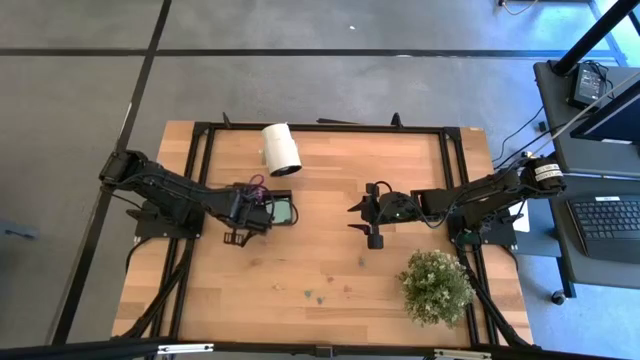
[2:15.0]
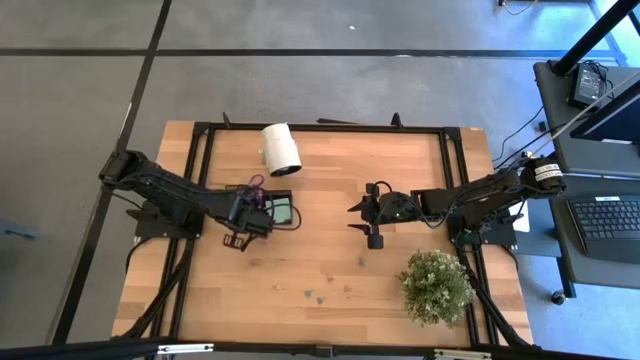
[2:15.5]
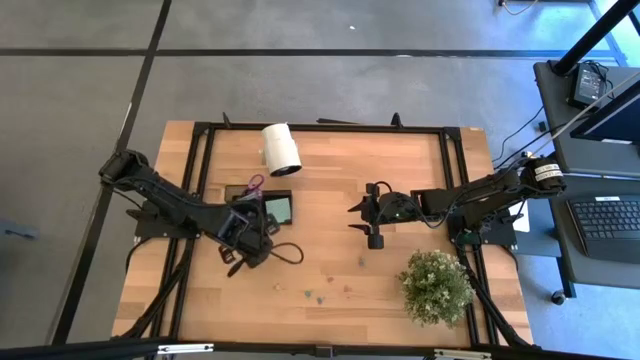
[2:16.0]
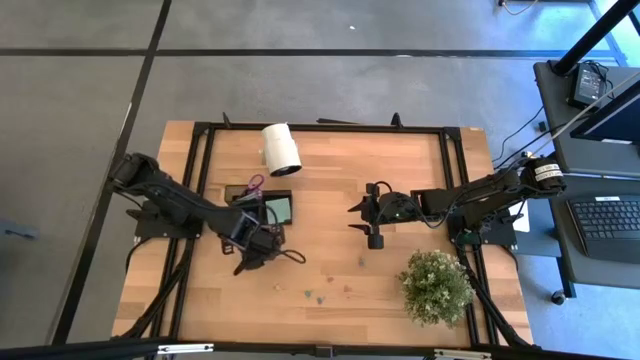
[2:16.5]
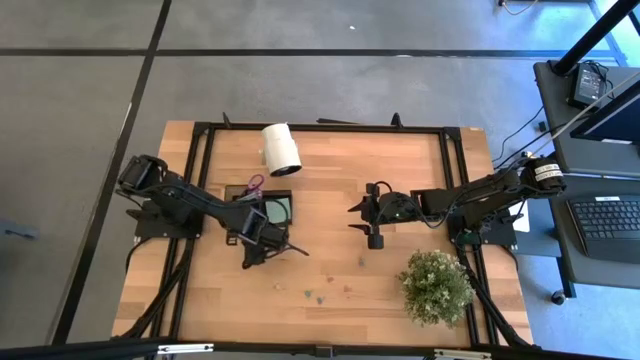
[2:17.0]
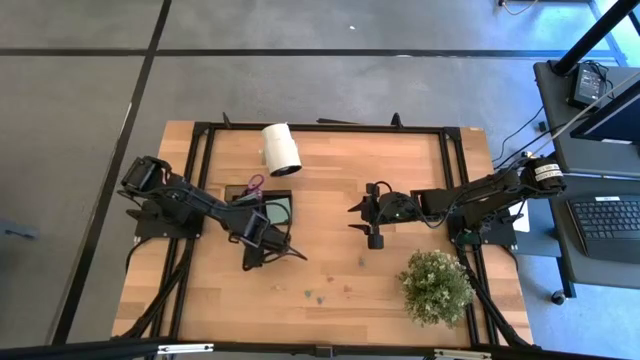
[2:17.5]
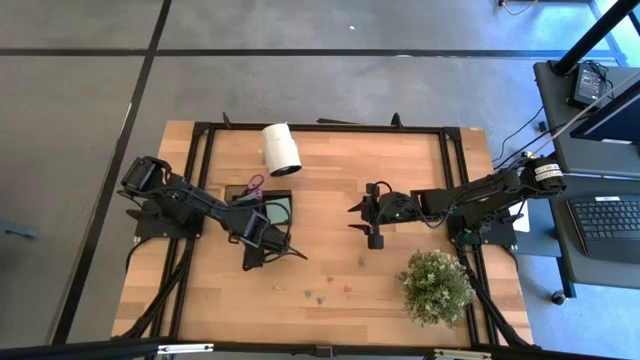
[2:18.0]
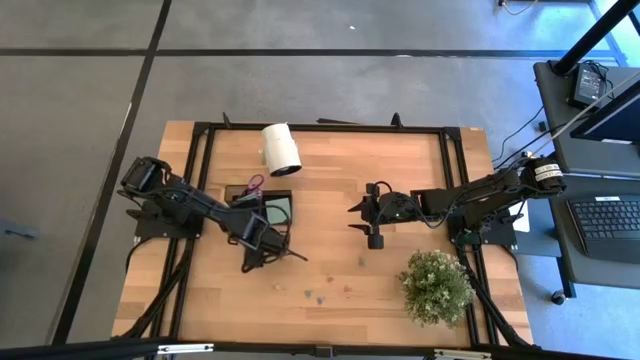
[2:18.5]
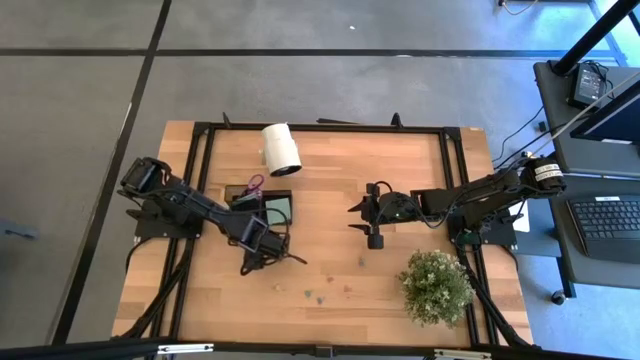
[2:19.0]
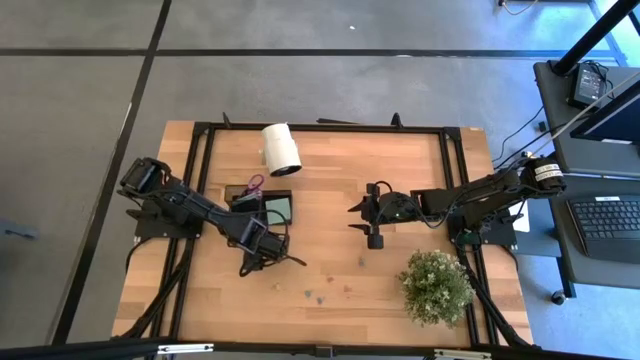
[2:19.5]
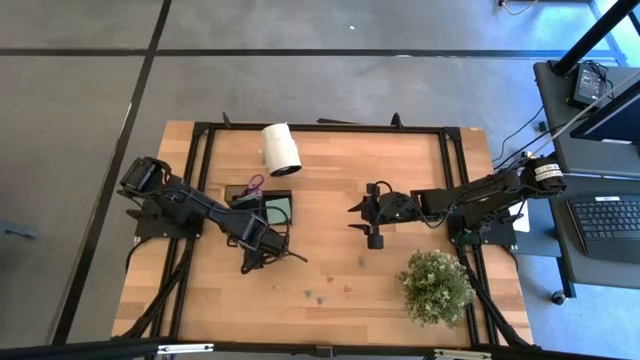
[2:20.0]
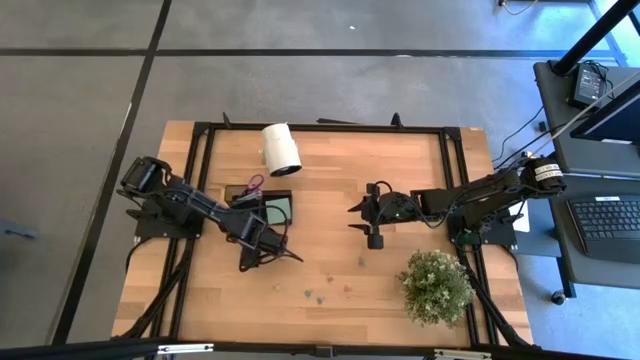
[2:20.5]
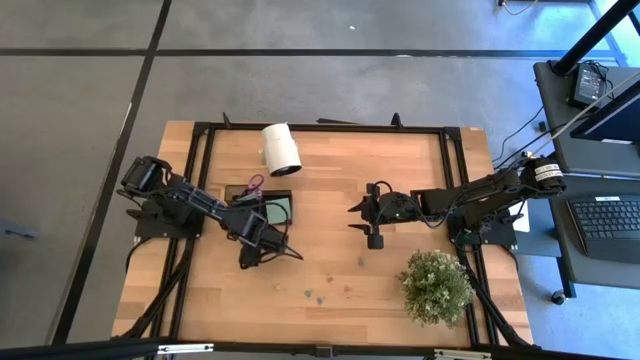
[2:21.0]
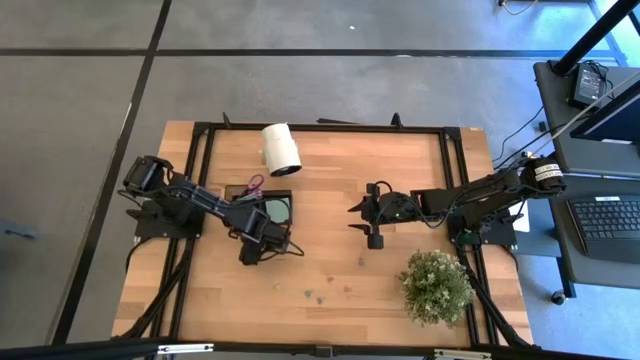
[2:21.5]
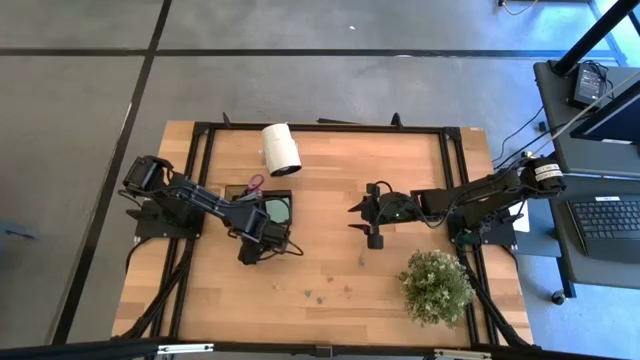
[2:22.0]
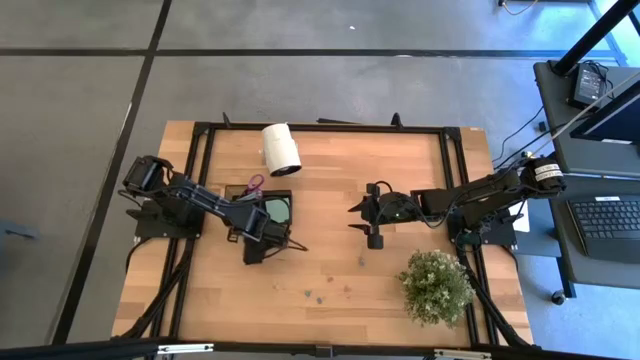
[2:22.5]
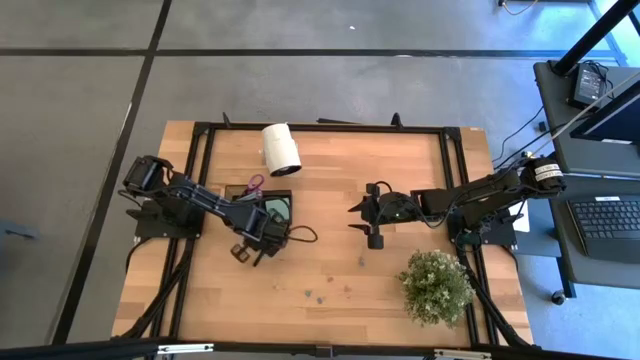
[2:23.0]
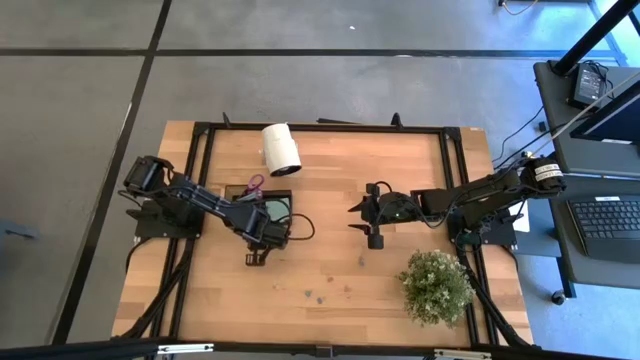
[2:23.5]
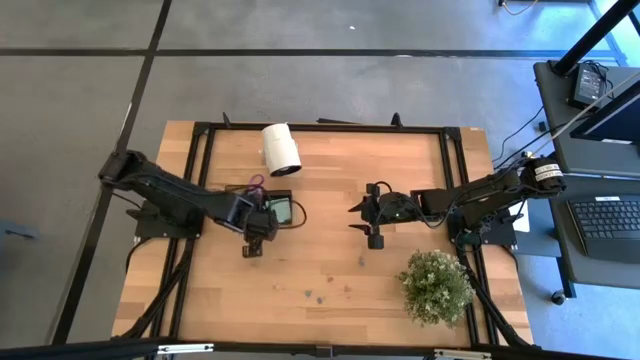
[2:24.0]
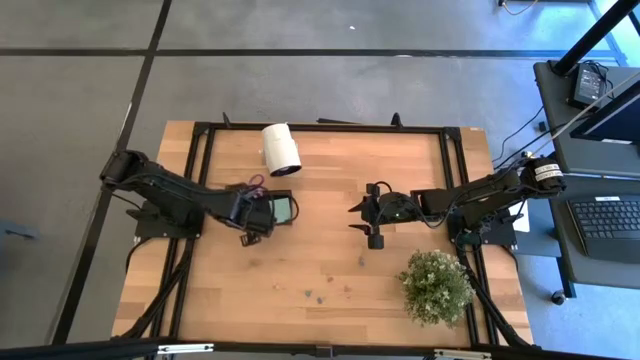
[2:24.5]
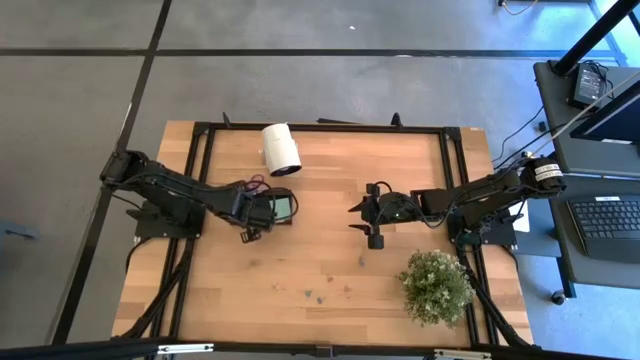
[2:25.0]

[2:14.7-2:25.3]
Task: Pick and place office supplies into organizer
Put the pink binder clip into the black desk organizer

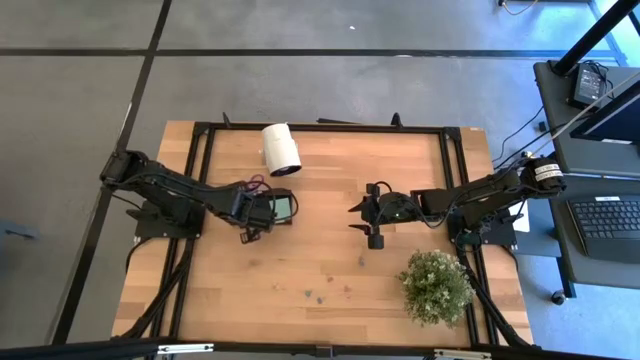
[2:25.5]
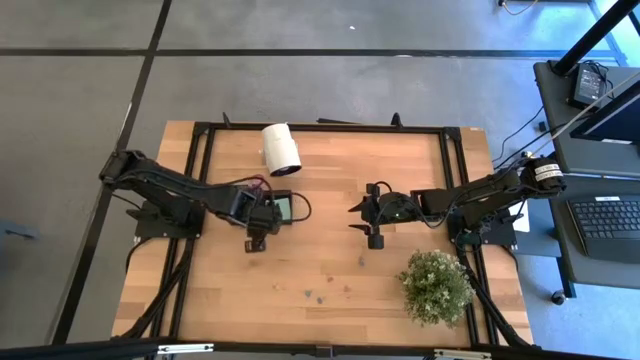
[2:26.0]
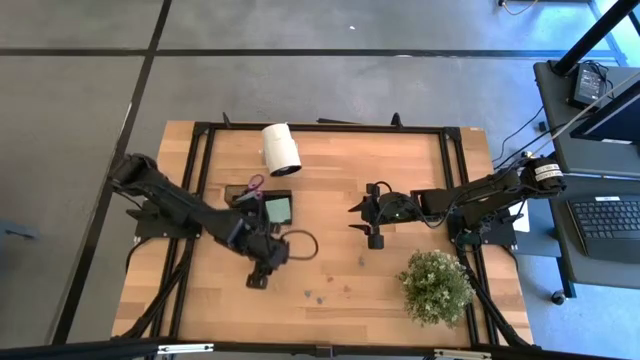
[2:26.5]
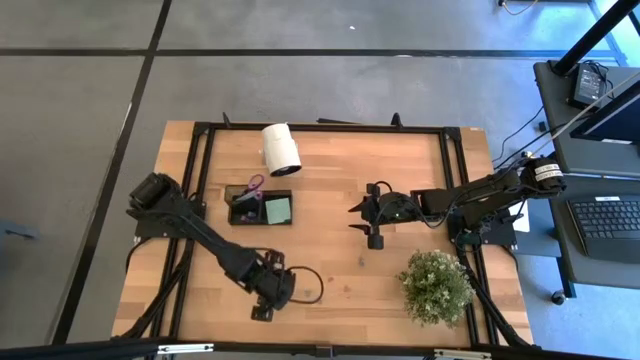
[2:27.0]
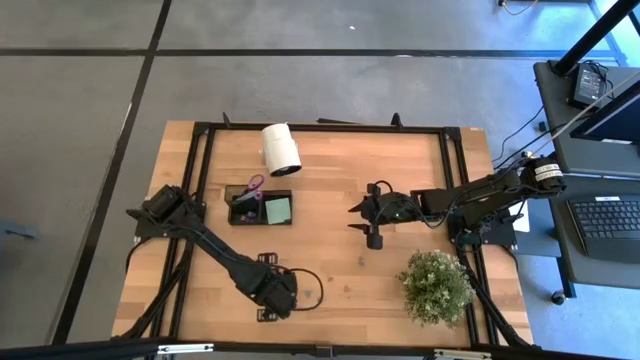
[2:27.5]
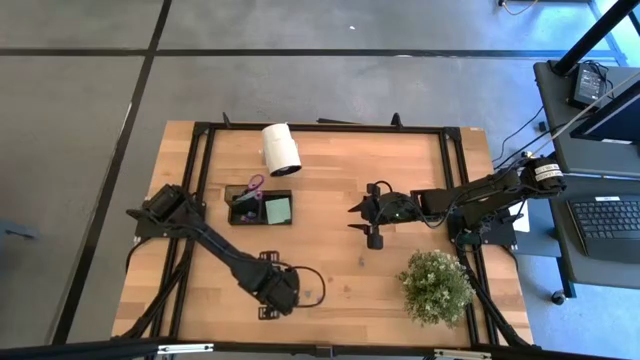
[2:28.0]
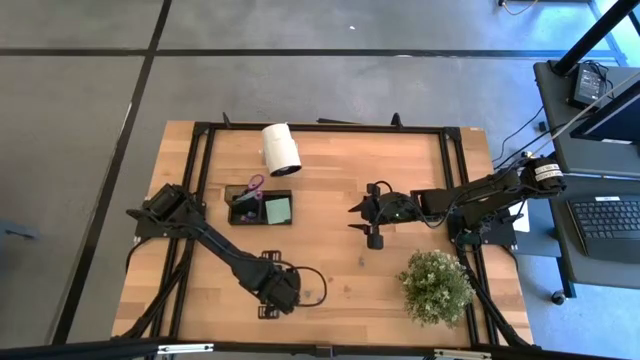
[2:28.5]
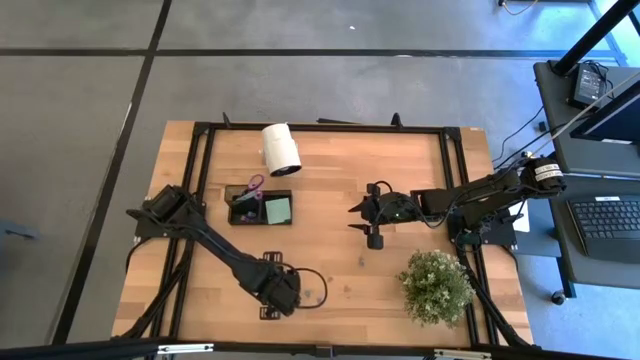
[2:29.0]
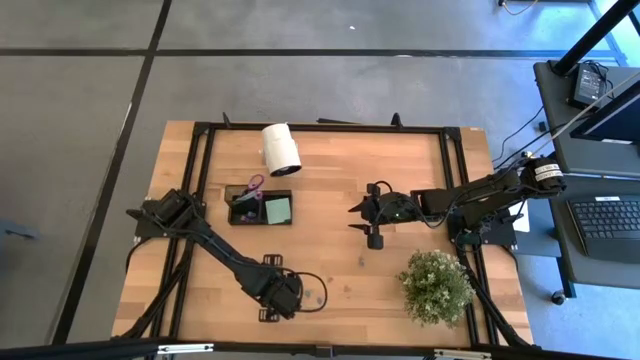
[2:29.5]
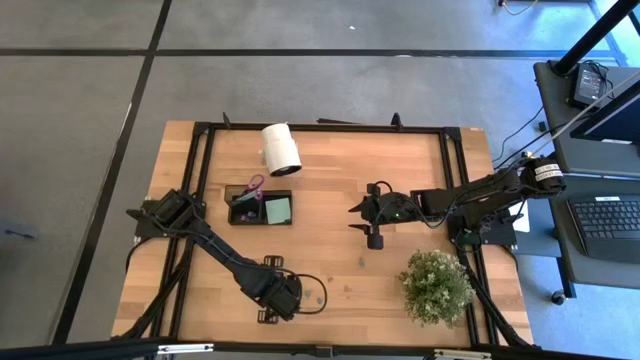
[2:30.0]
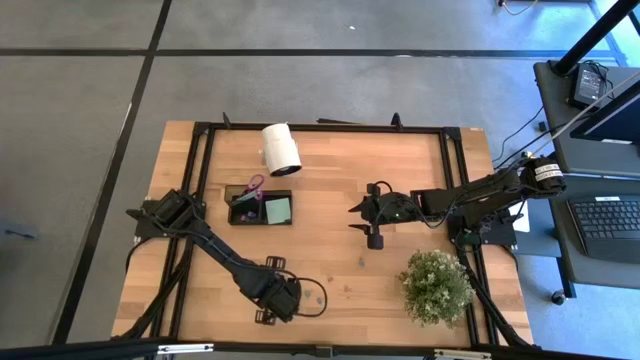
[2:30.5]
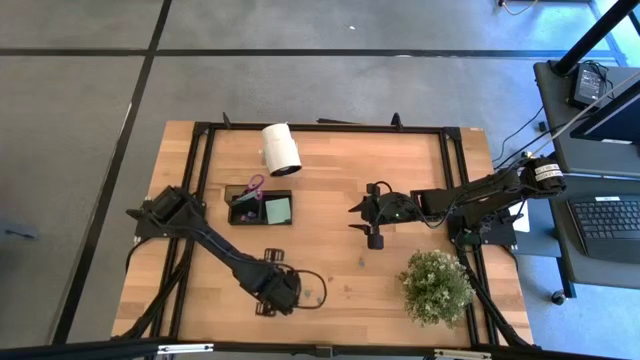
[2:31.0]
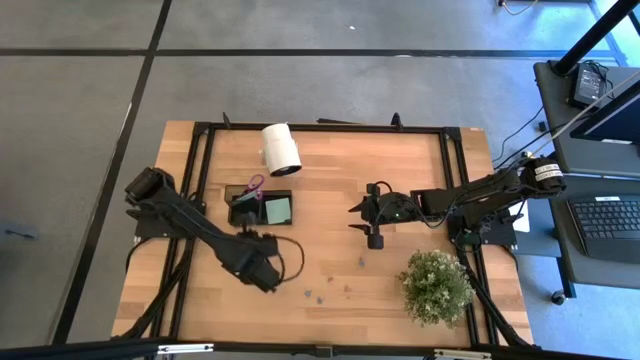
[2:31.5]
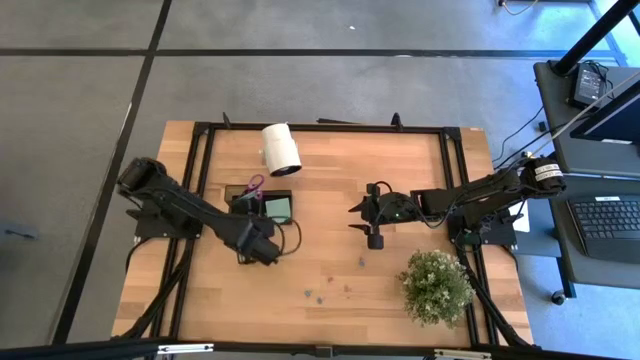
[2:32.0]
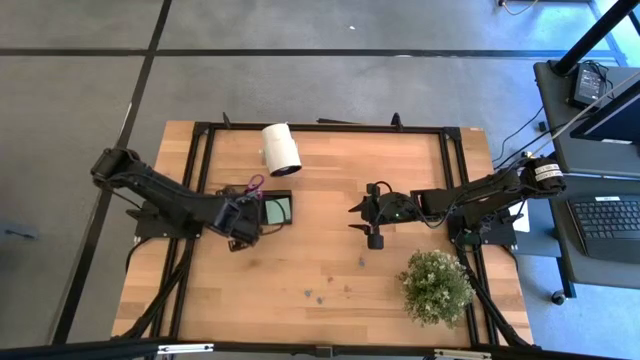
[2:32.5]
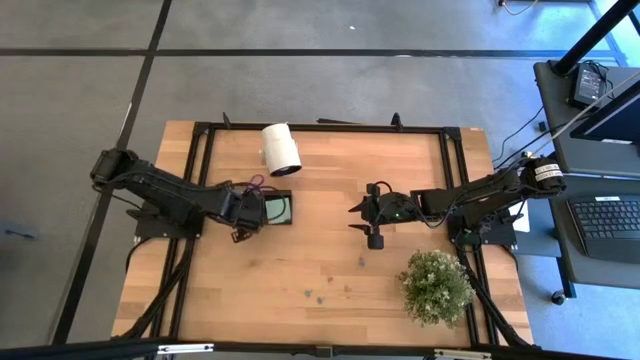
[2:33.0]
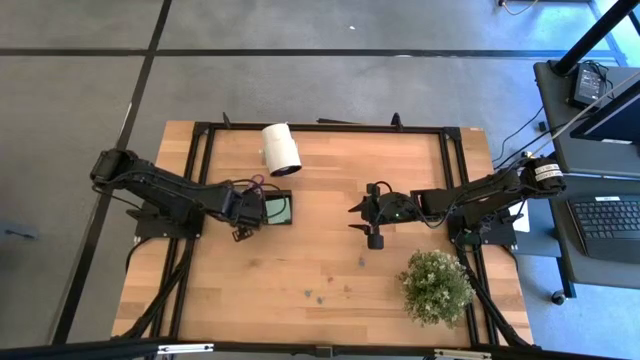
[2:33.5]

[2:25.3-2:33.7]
Put the yellow binder clip into the black desk organizer

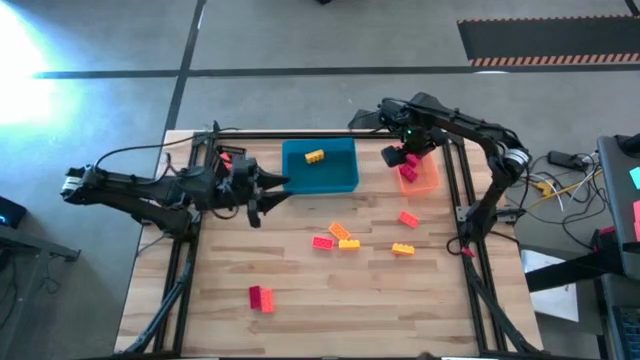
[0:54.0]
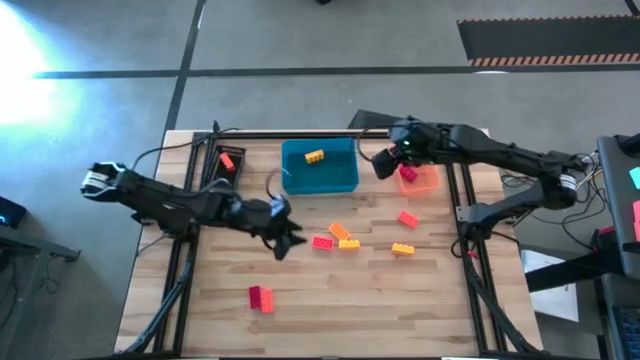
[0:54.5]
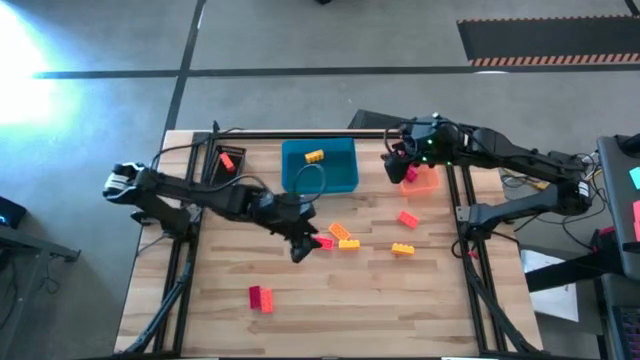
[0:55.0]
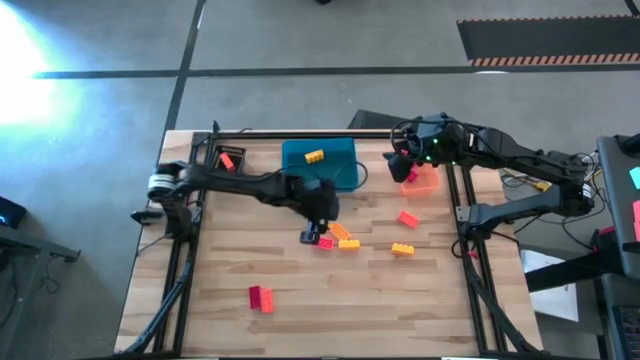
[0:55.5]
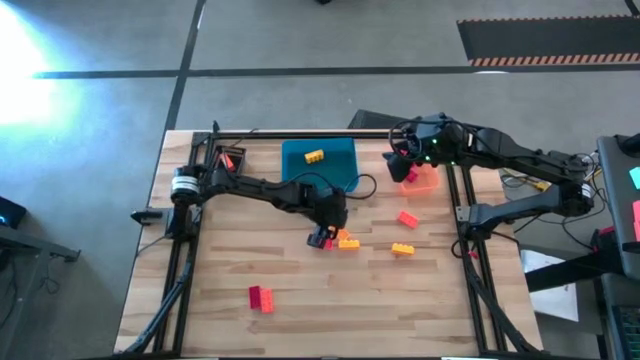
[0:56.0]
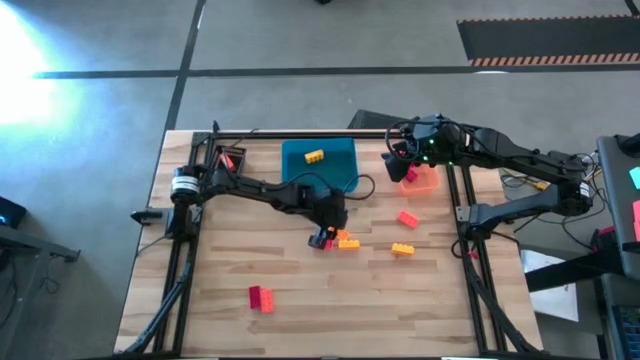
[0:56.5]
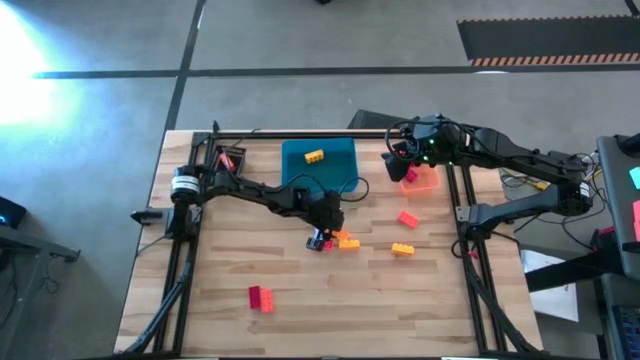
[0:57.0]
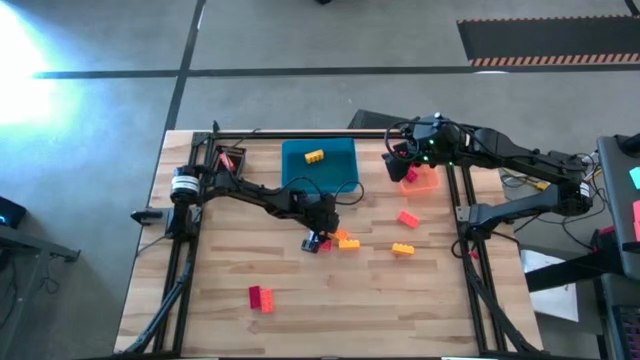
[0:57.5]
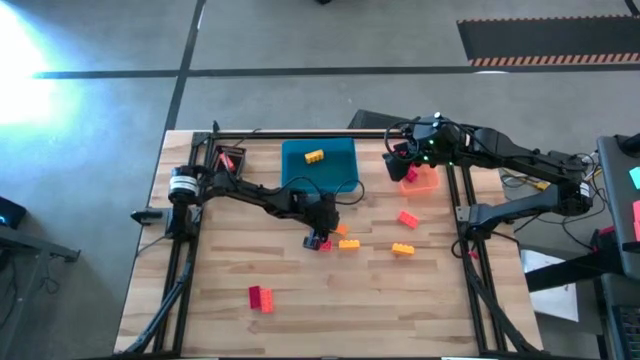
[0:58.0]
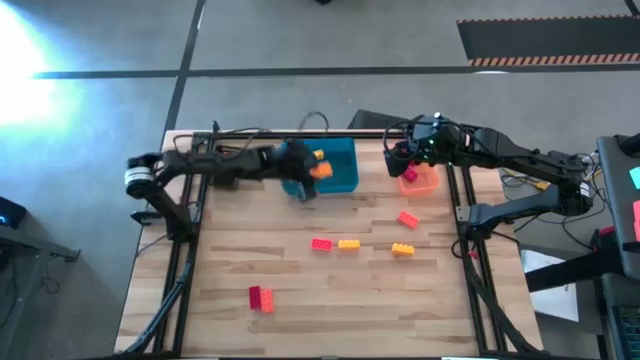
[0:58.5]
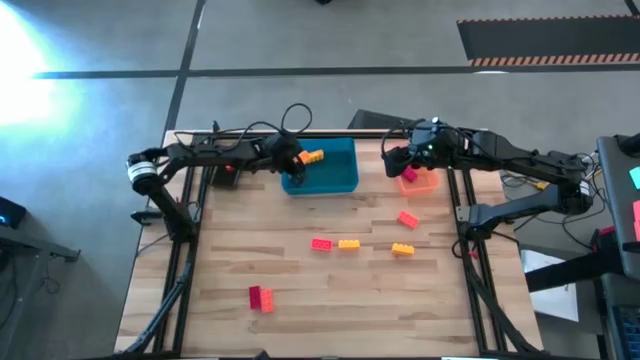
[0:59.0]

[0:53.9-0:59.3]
Task: Sort & place blocks by color
Put the yellow game piece into the blue bin
